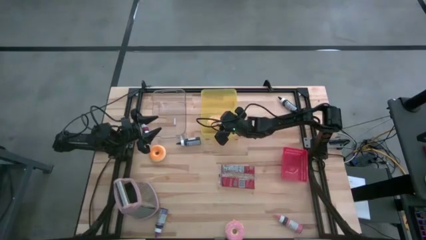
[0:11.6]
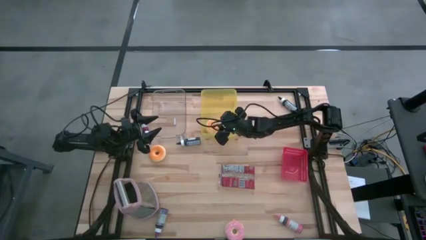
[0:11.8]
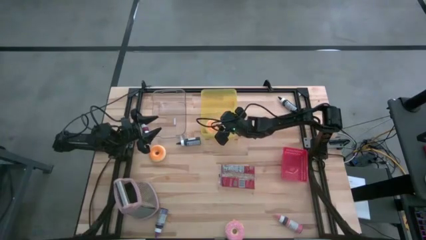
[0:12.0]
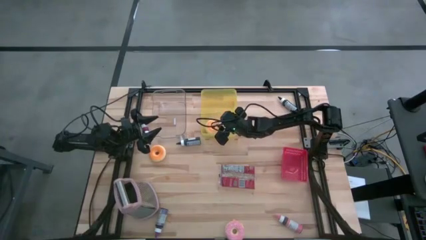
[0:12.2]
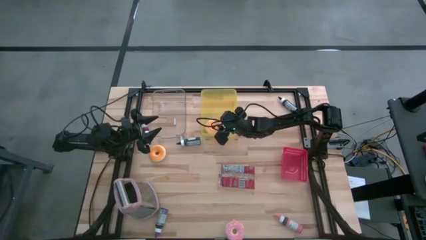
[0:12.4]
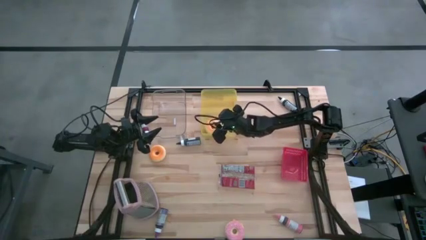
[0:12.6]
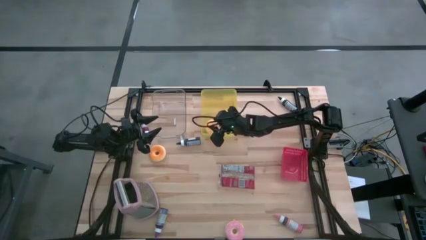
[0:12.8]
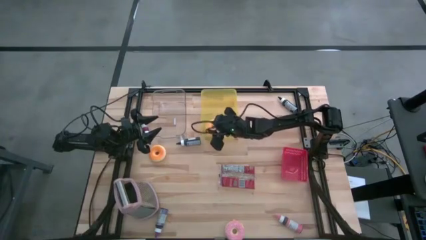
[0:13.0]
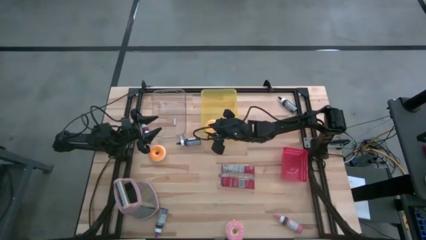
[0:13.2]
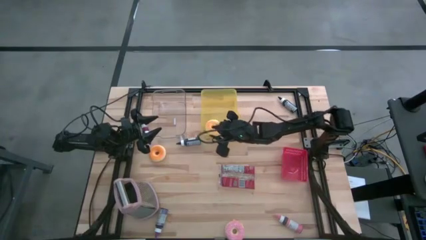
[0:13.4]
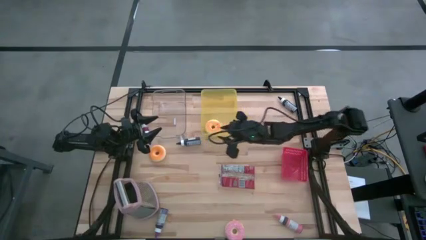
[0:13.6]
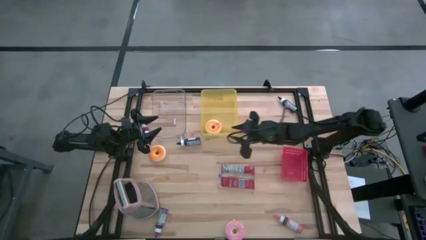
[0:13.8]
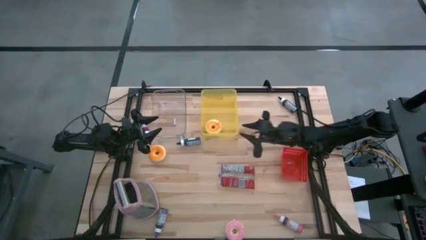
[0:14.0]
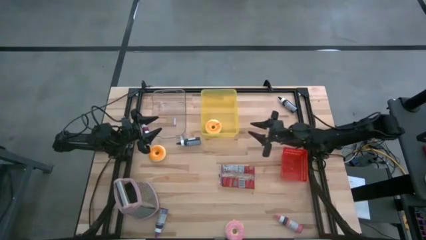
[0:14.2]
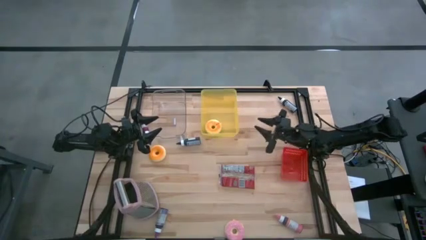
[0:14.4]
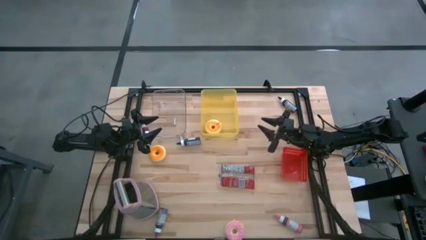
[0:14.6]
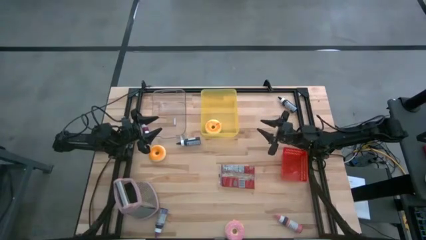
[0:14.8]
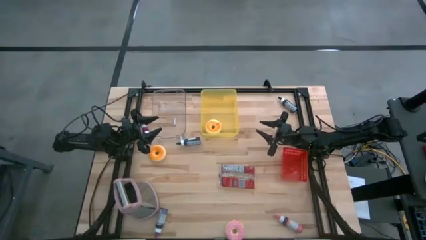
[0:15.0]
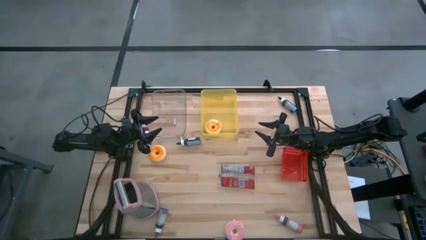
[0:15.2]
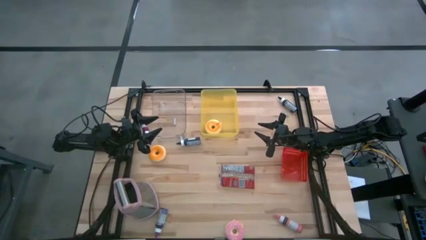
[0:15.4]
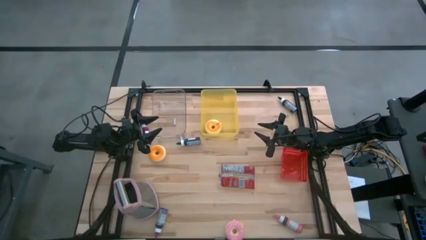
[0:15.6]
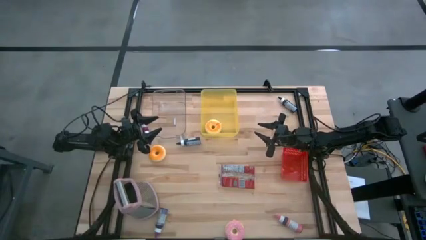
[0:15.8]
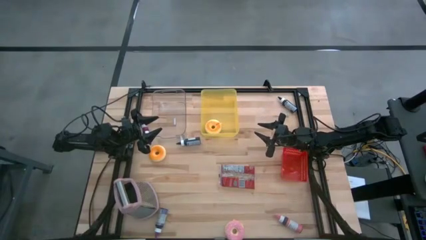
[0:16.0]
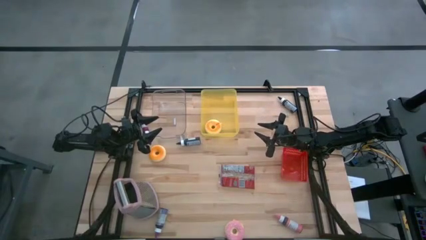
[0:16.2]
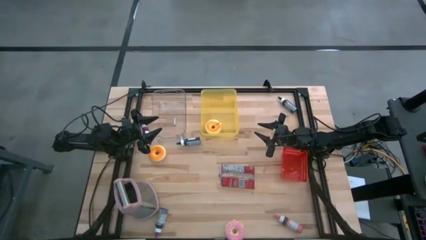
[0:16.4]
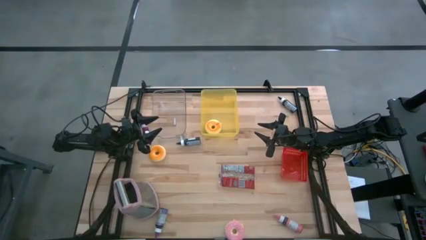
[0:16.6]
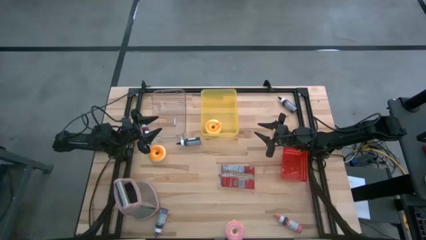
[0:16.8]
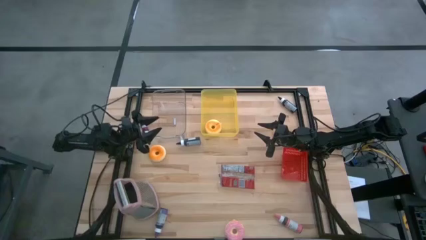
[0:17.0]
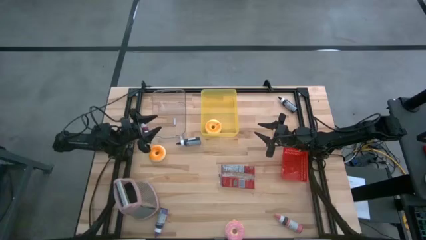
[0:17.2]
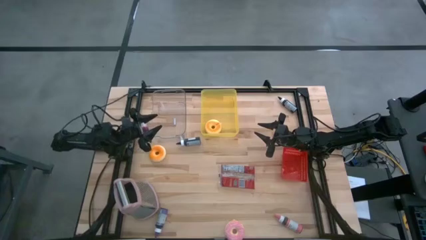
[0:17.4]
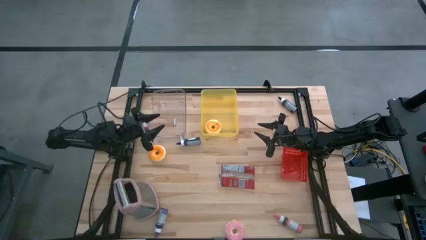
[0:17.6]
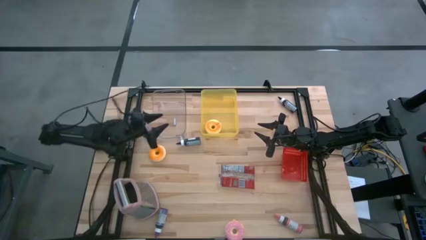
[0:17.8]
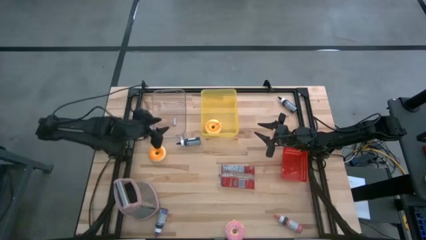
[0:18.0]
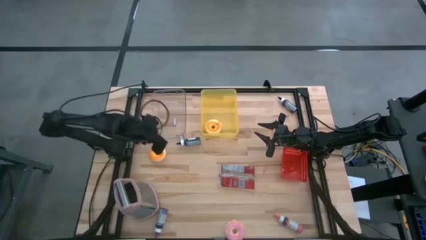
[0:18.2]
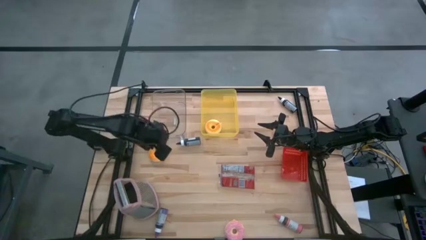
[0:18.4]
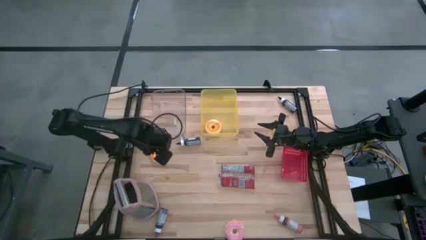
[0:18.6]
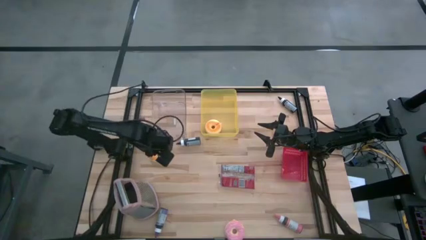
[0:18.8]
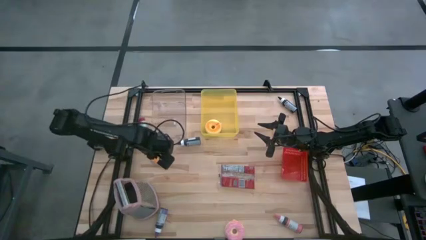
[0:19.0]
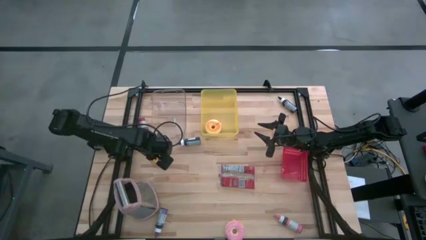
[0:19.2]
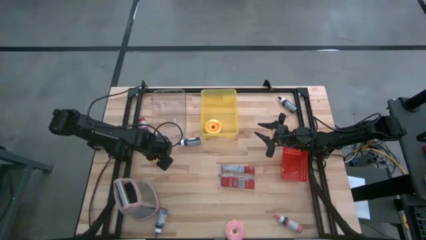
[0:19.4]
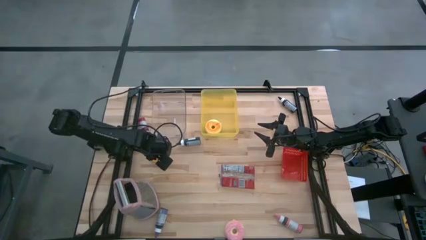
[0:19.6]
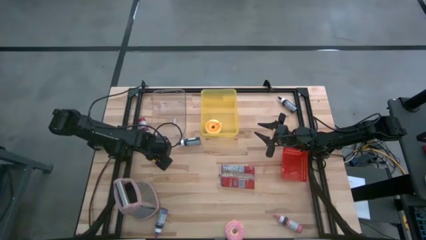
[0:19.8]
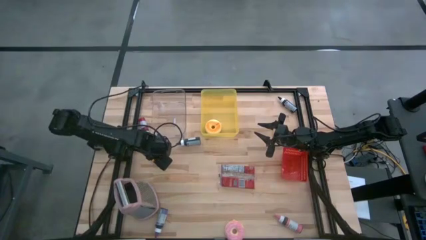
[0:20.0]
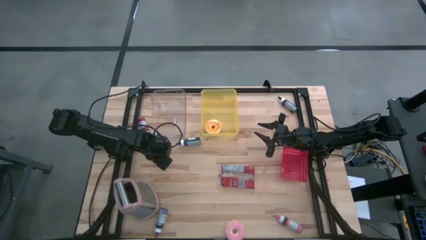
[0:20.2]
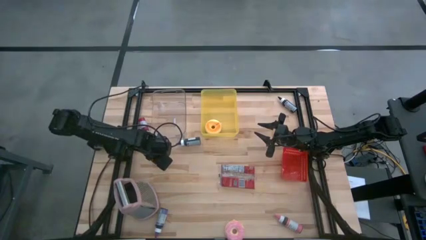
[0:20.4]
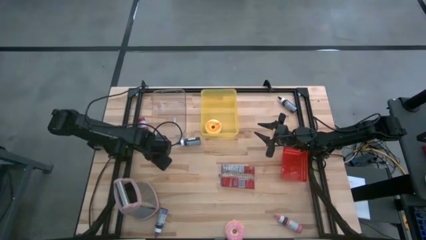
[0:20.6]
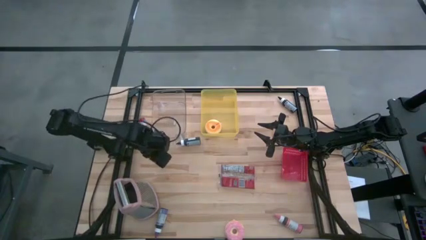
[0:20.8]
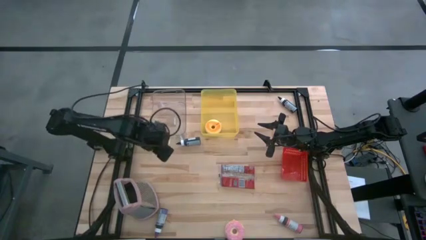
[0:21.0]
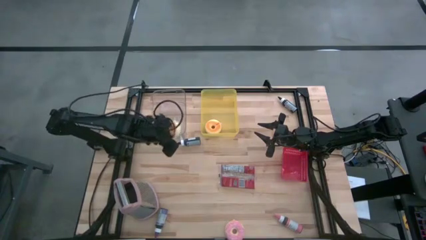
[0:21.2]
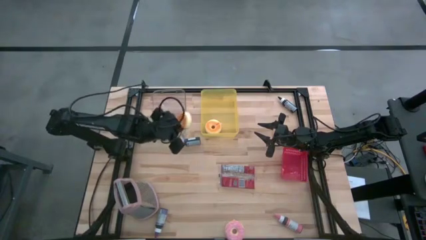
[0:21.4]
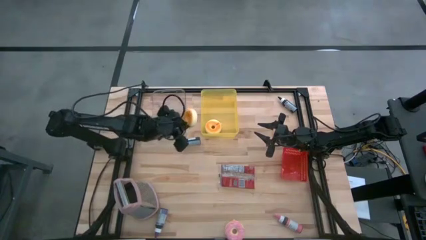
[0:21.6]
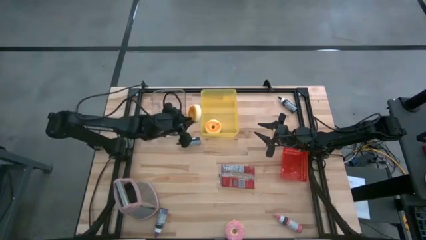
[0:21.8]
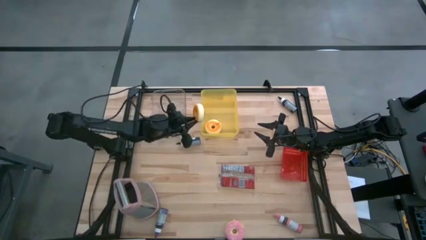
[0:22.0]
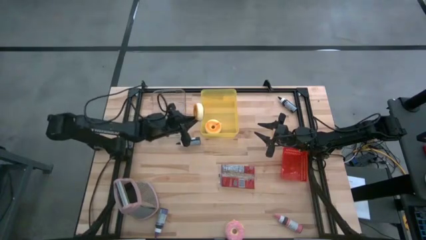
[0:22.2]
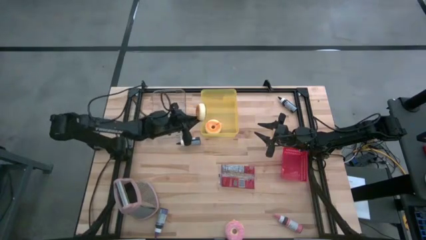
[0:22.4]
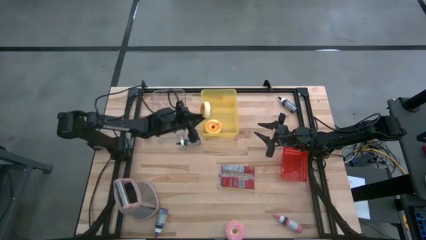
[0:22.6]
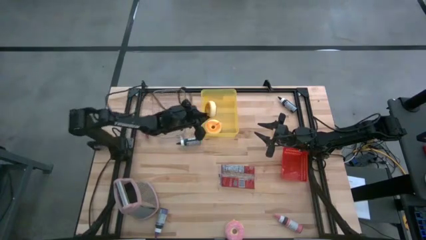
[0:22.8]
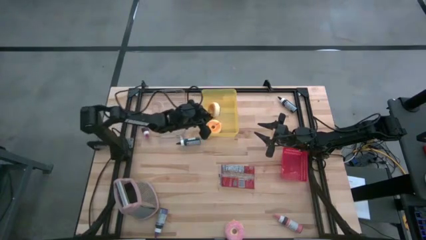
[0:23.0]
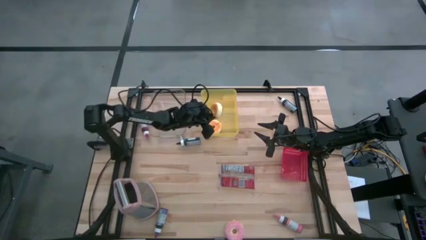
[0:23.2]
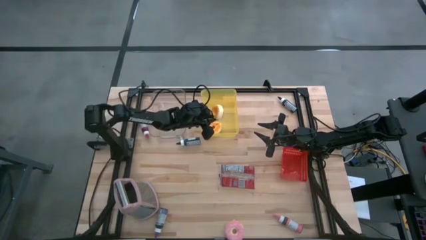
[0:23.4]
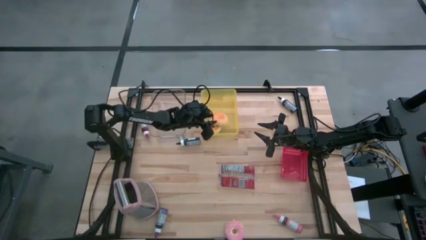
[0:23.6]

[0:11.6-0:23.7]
Task: Pick & Place Food Item
Put the orange donut into the yellow bin
